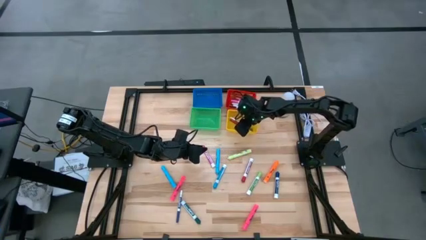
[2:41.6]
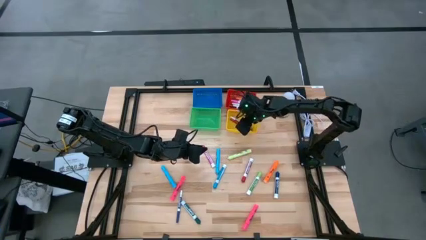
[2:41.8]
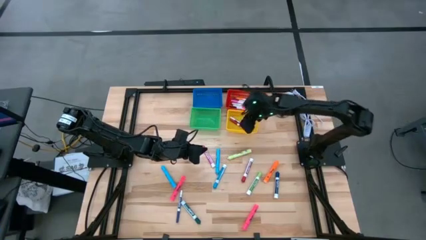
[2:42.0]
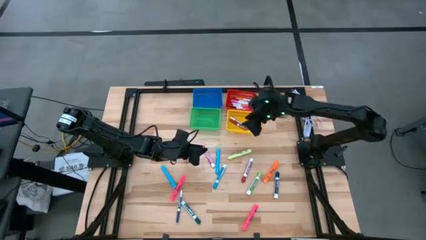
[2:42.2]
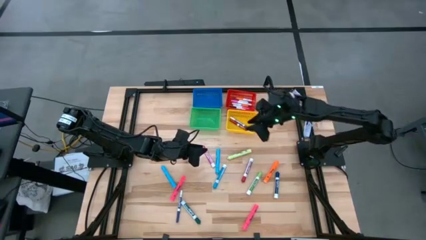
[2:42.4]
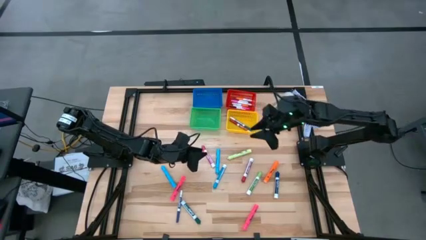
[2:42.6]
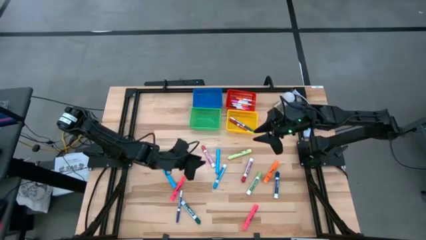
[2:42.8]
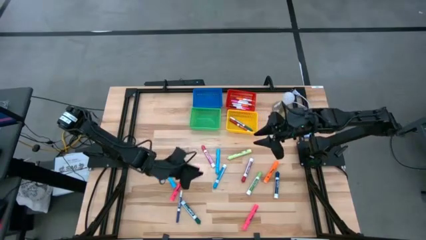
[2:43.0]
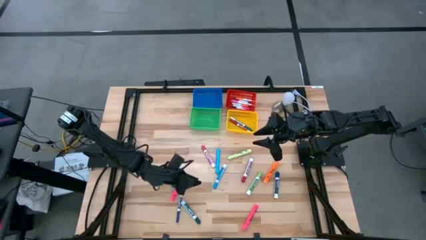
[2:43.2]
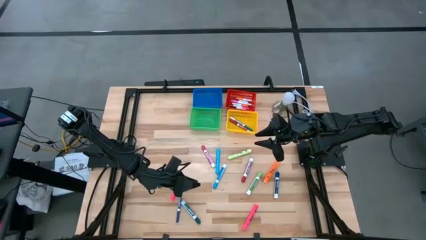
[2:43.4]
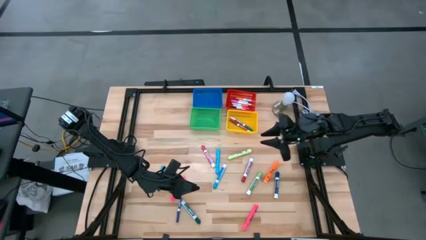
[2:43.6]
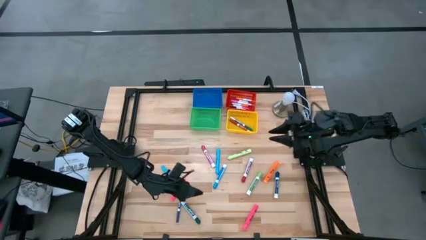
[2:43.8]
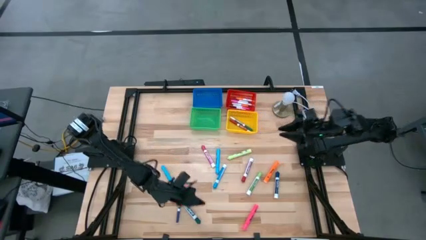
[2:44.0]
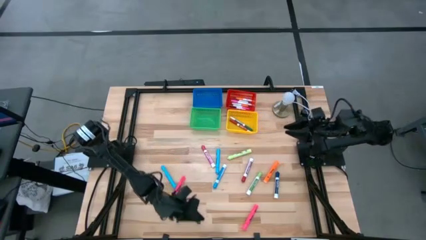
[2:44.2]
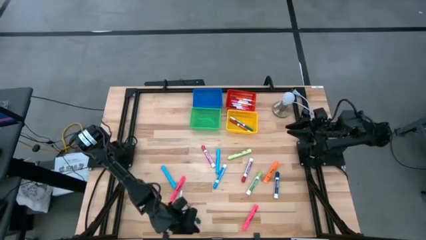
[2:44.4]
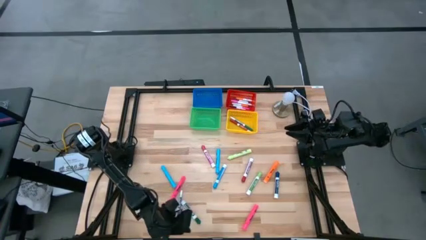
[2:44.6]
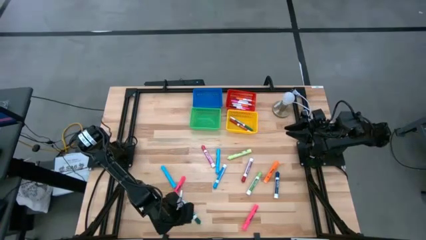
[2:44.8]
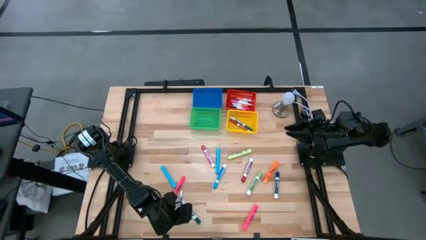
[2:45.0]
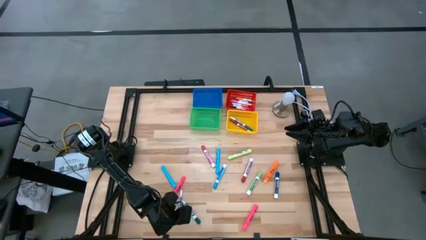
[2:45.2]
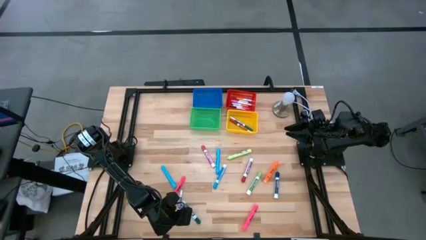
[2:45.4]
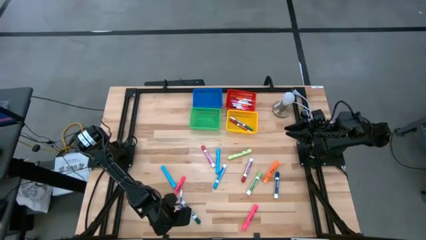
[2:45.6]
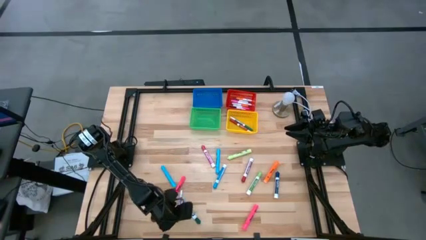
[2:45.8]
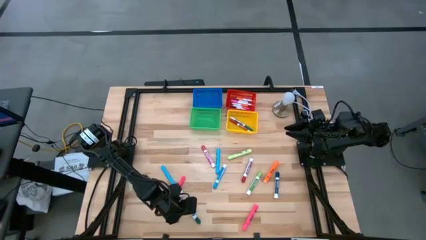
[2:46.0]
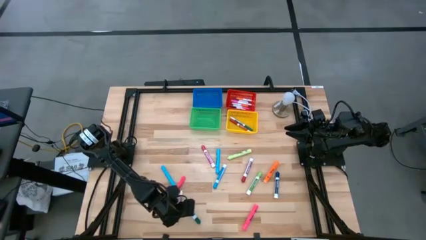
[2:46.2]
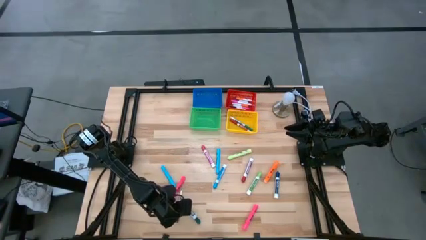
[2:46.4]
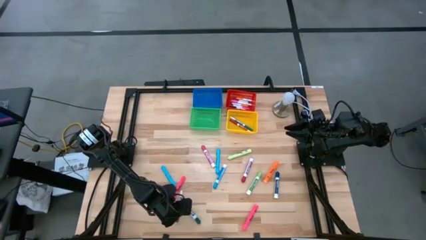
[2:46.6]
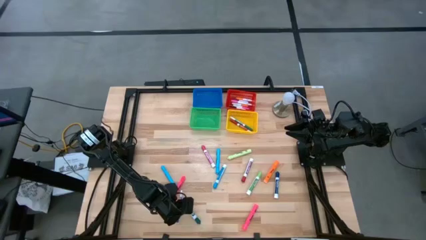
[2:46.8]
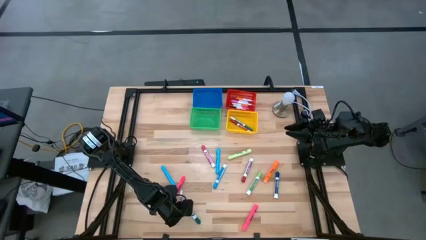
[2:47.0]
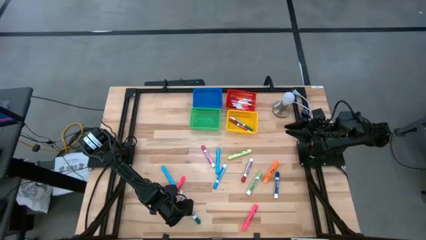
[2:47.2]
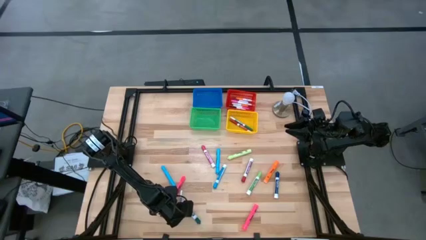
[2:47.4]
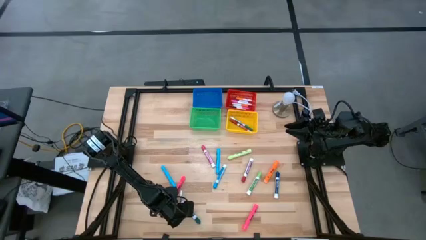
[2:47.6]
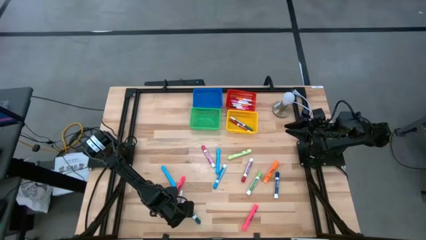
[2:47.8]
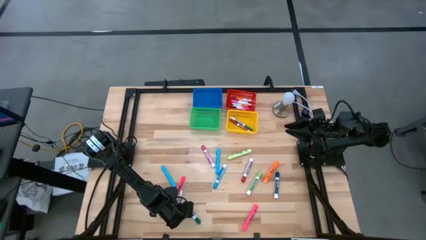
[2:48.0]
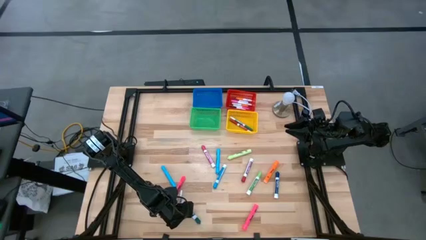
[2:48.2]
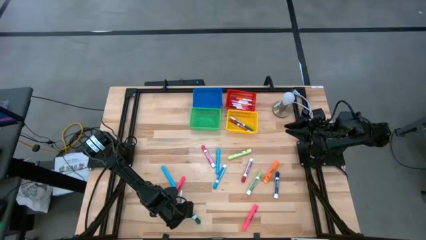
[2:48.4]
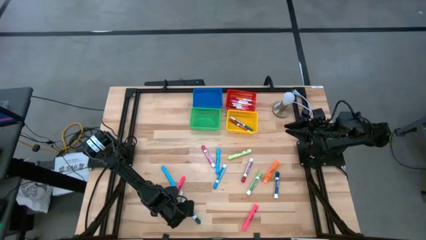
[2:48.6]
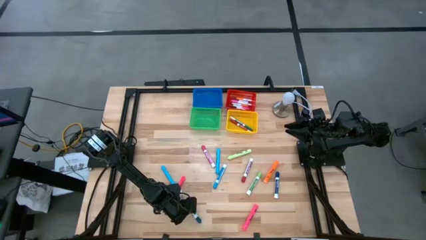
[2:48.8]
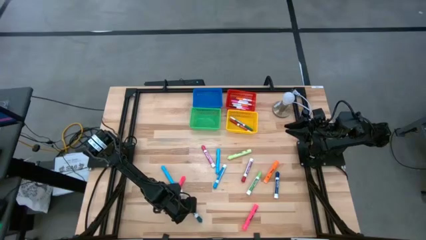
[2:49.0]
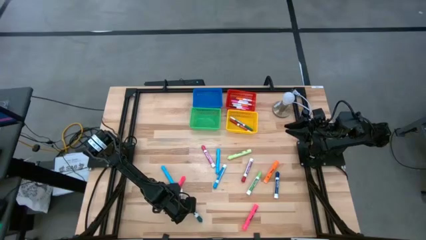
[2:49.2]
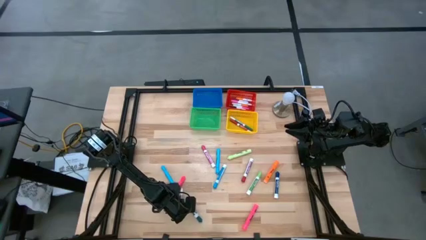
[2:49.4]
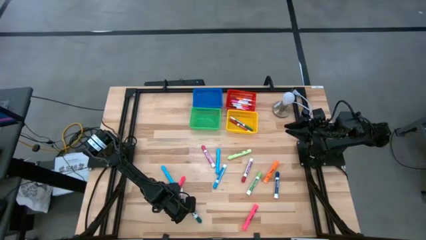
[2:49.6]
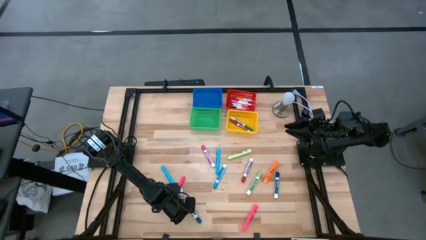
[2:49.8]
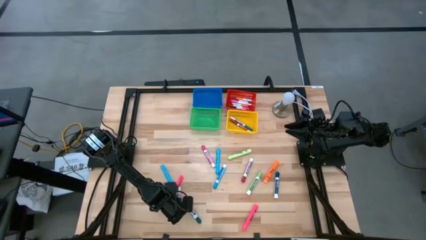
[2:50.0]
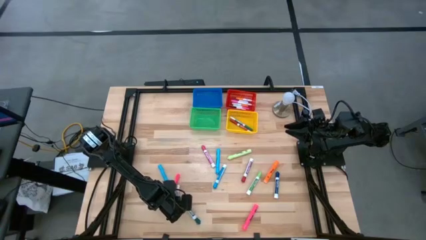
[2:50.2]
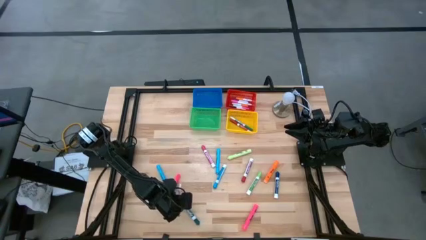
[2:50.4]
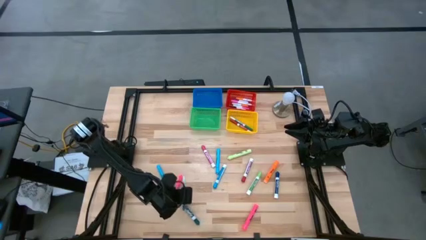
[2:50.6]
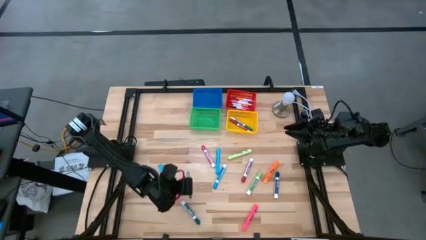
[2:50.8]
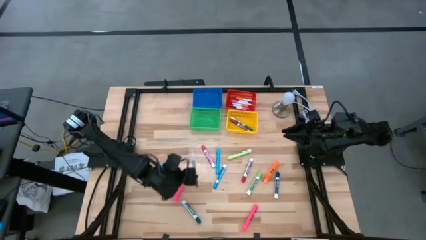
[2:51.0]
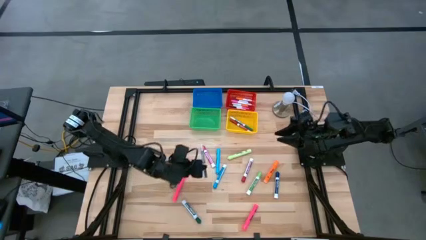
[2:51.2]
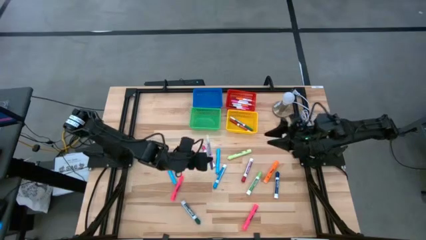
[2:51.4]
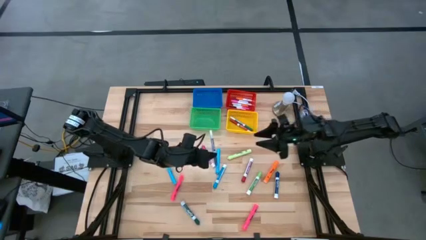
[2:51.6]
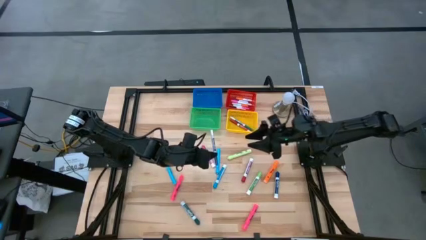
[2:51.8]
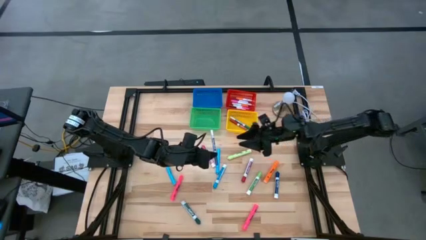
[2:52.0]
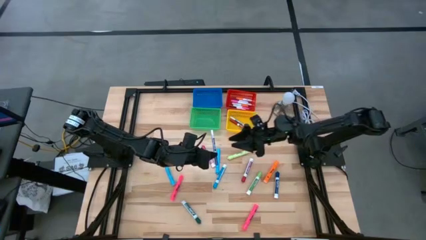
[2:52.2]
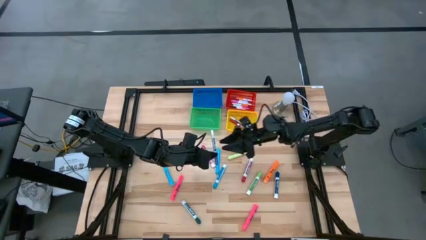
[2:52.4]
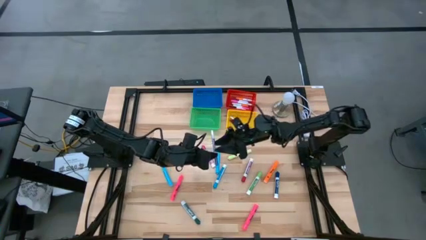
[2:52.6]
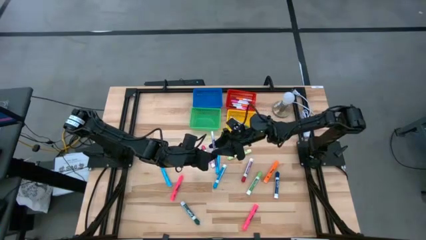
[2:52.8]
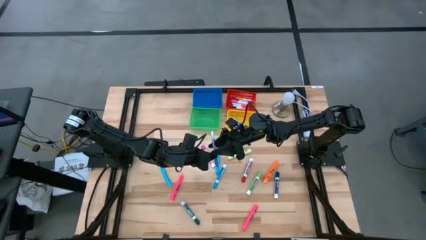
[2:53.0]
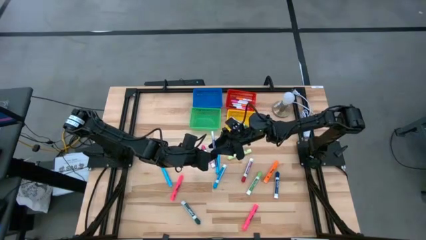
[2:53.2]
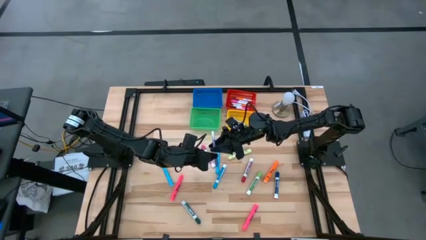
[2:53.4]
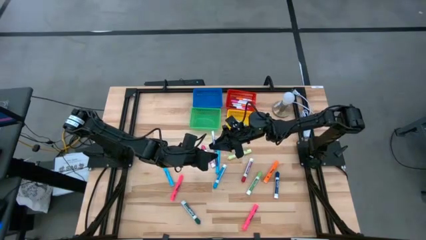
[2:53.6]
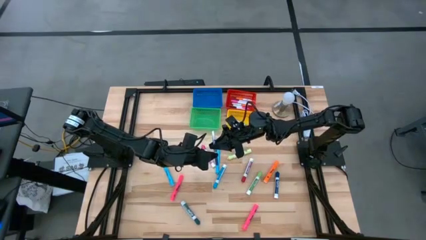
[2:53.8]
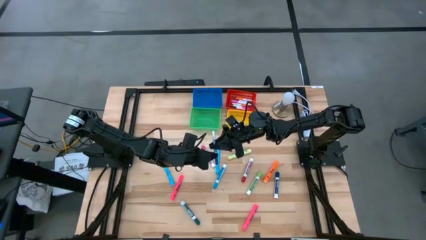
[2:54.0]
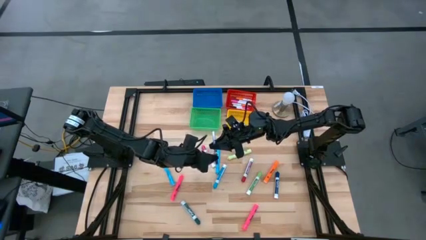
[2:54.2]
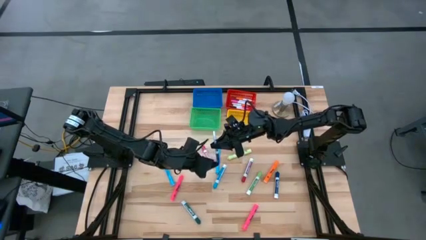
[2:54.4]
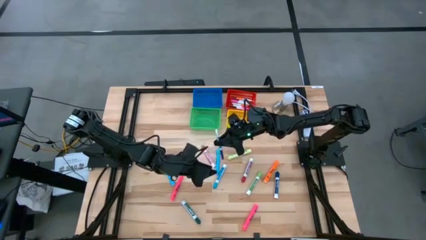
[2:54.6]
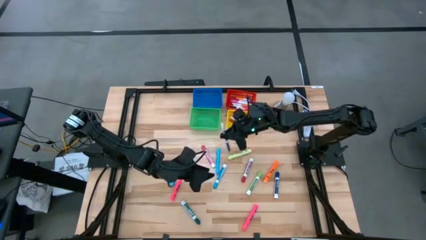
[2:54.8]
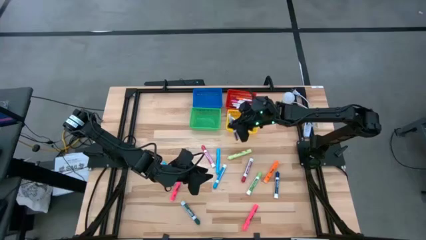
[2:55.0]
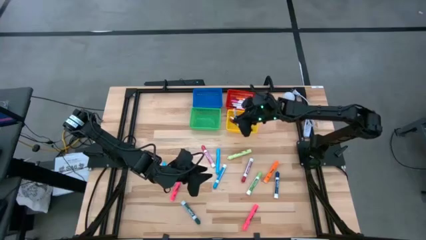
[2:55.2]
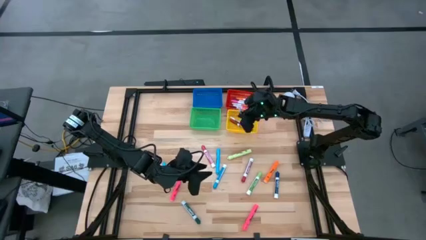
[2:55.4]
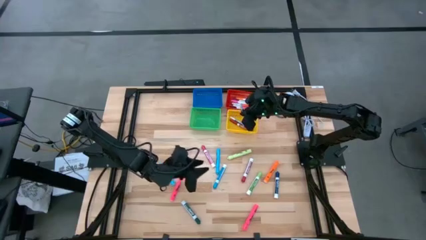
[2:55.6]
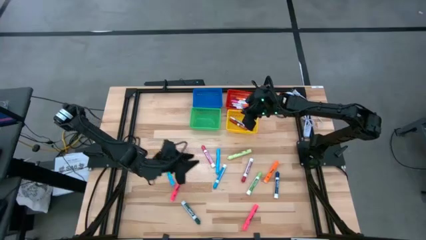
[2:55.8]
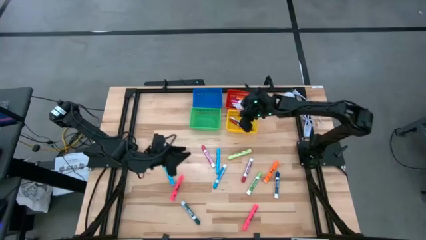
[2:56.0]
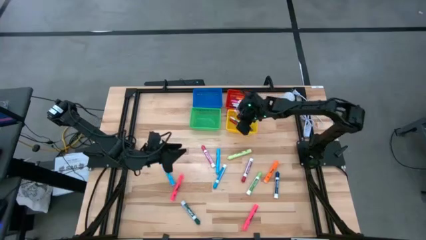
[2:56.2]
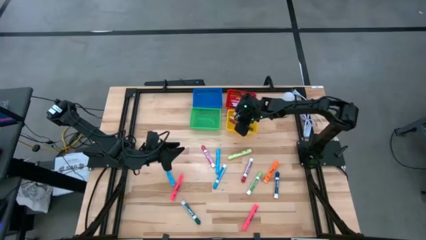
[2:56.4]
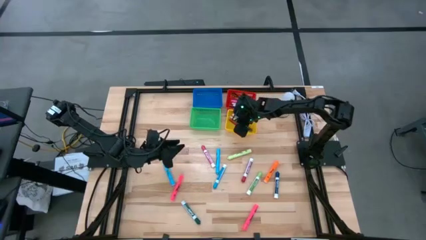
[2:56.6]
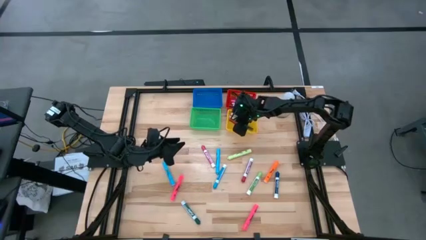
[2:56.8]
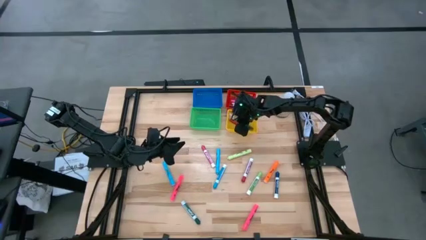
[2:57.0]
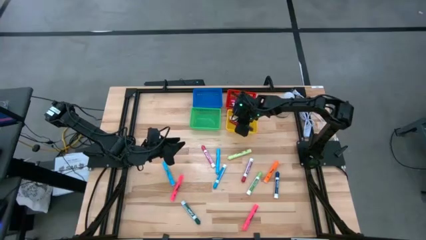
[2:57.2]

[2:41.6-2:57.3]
Task: Pick & Place Markers
Put the small purple marker into the yellow basket
